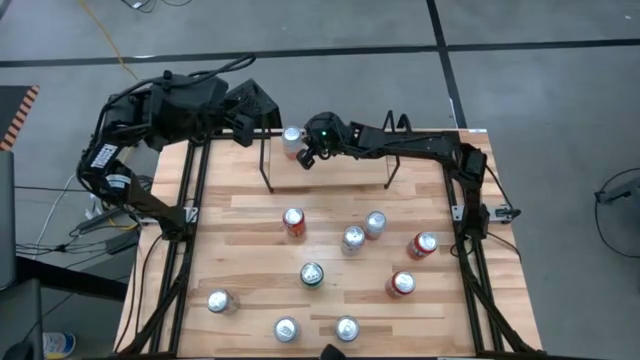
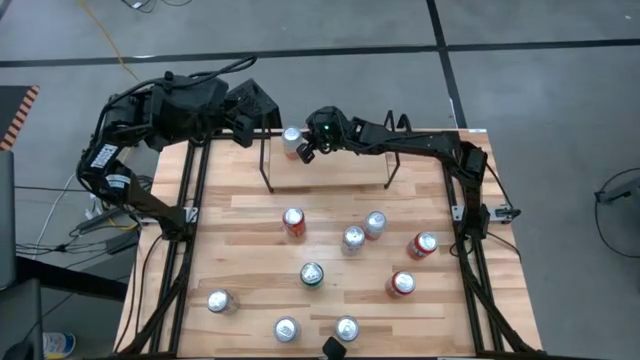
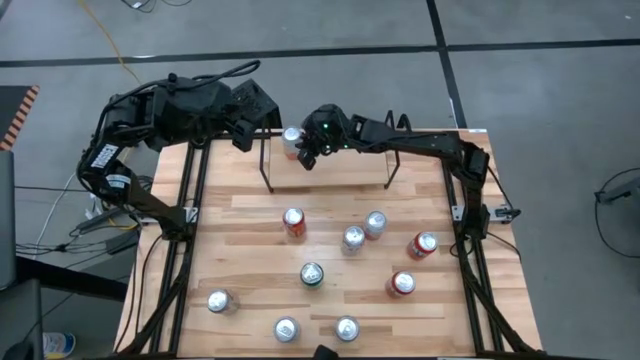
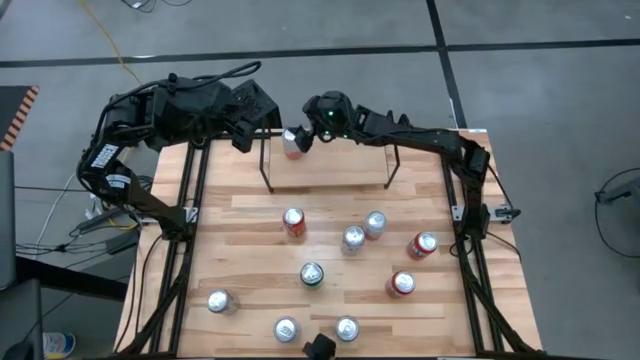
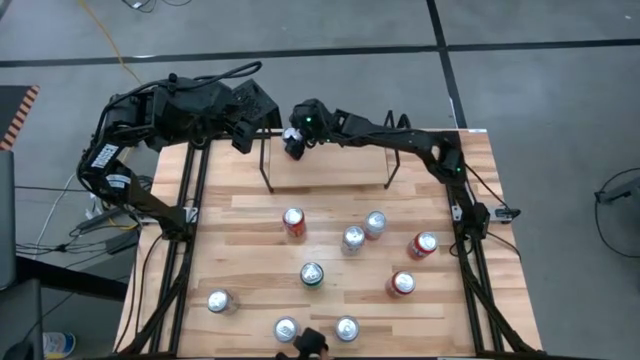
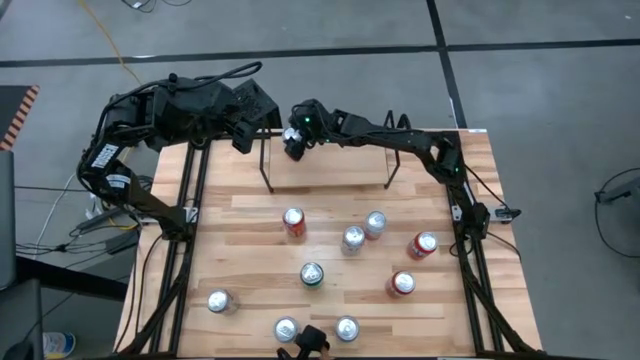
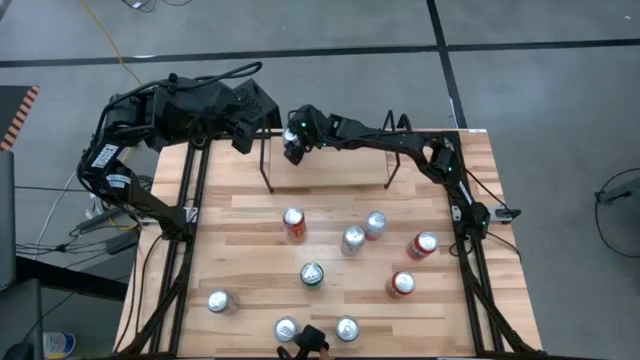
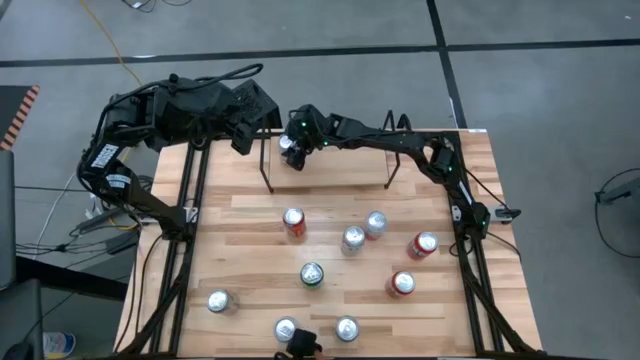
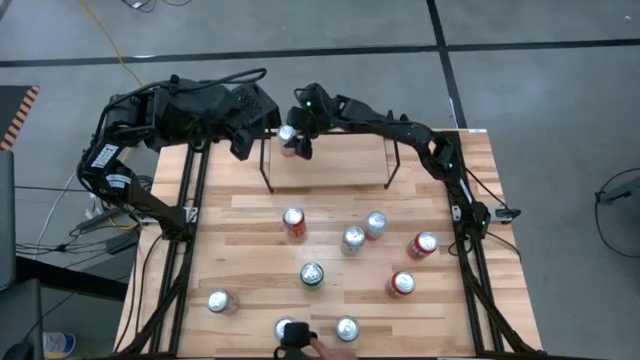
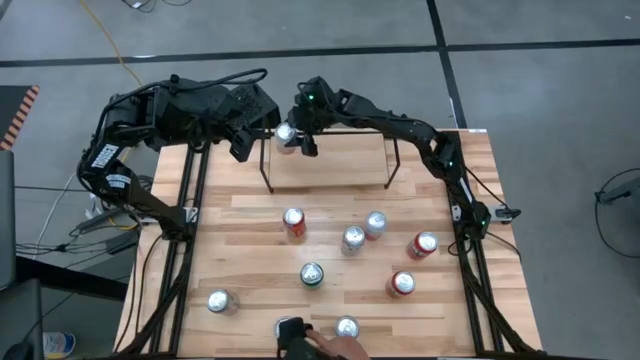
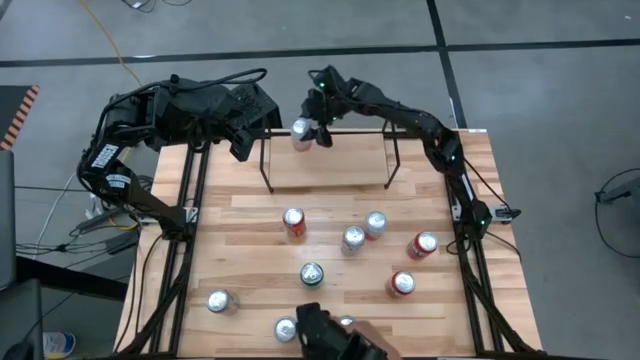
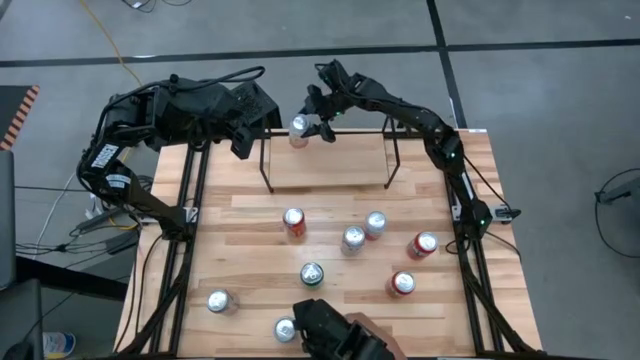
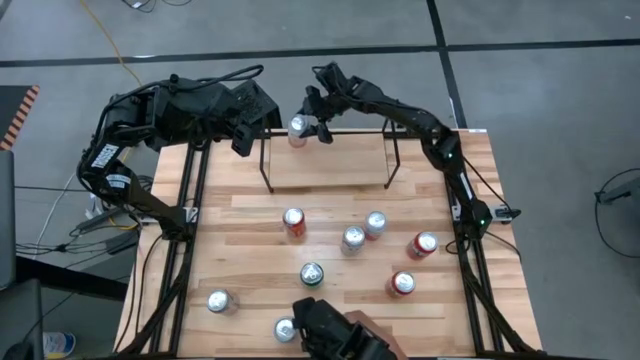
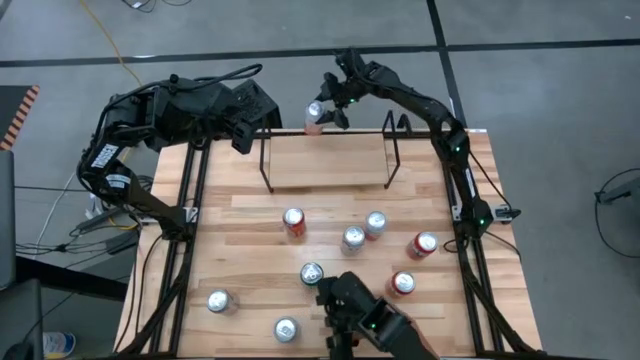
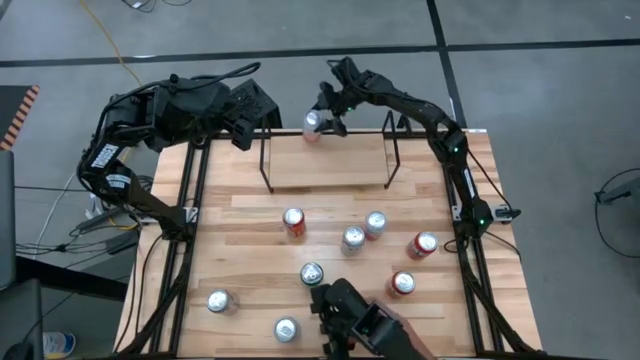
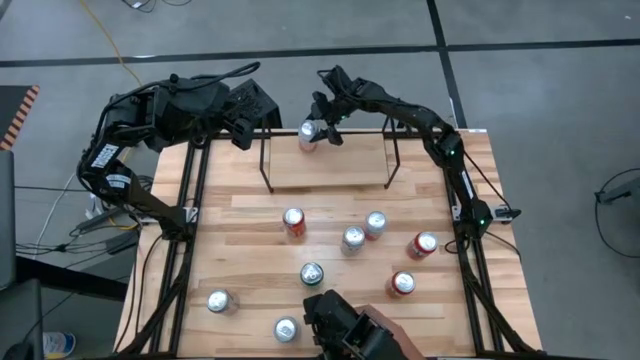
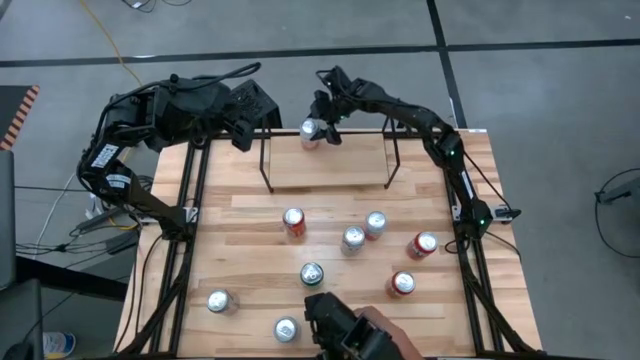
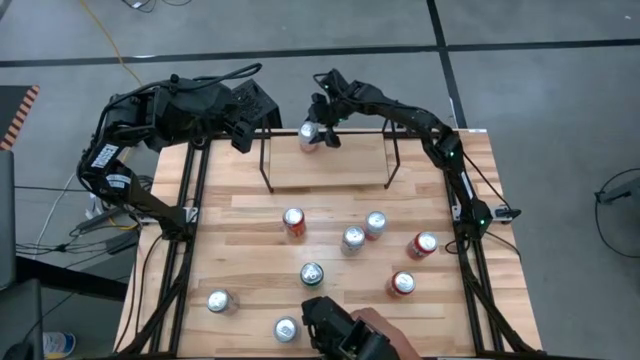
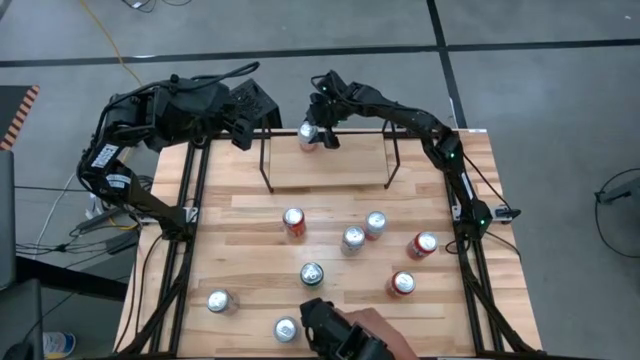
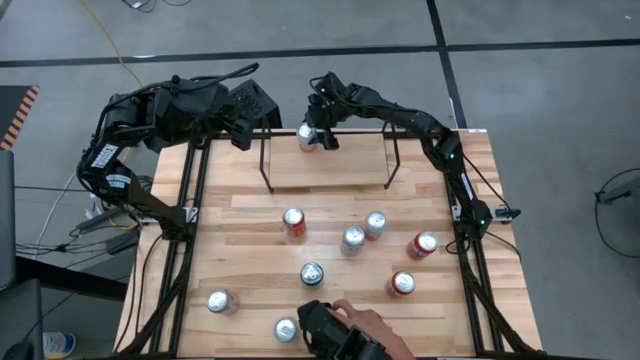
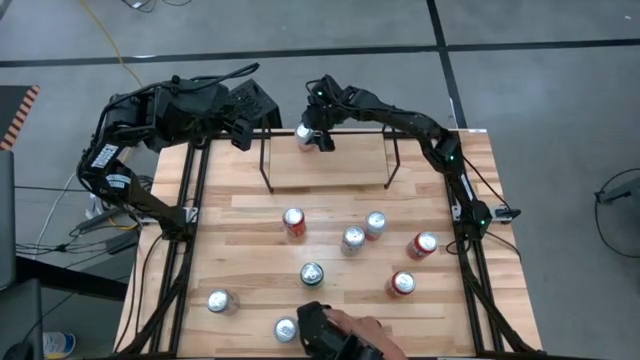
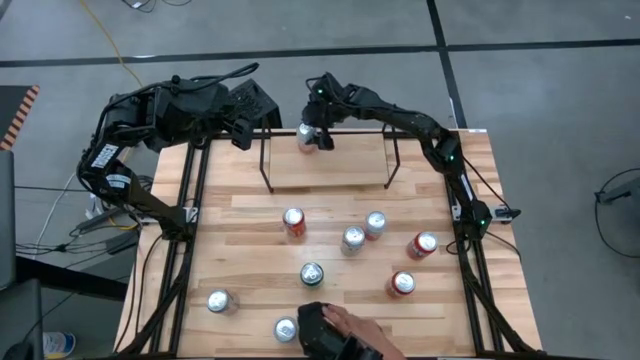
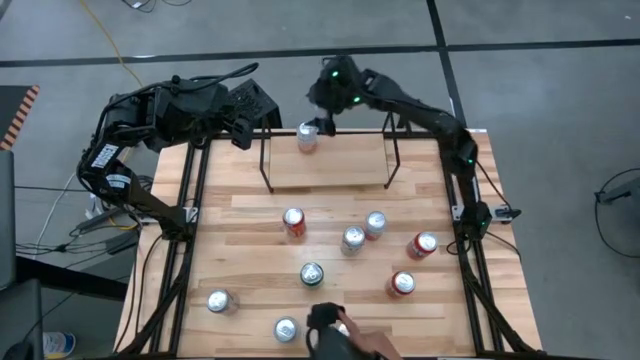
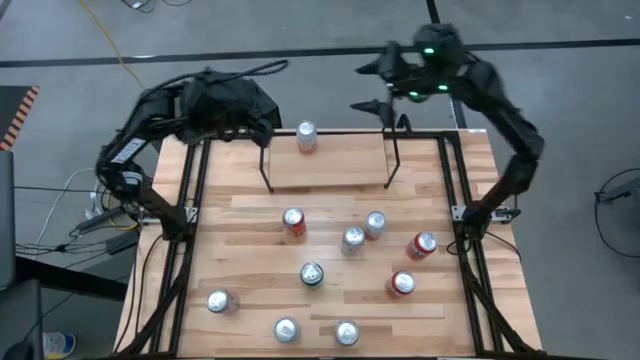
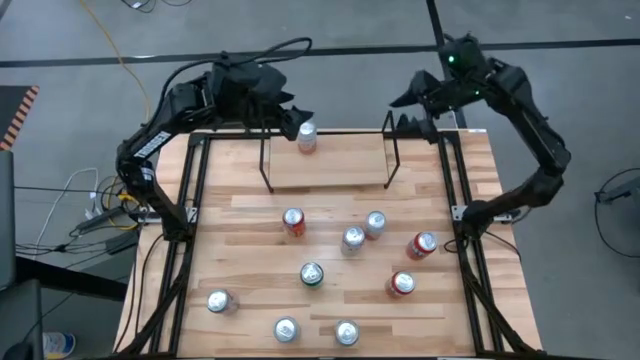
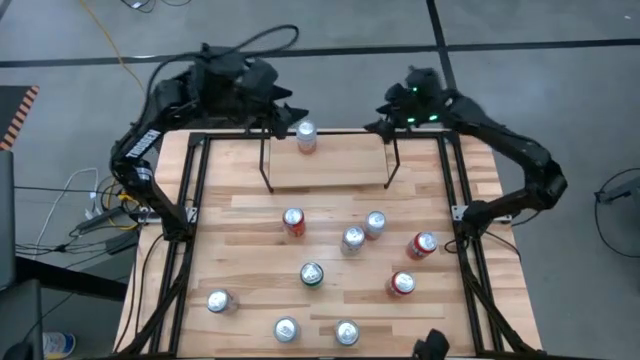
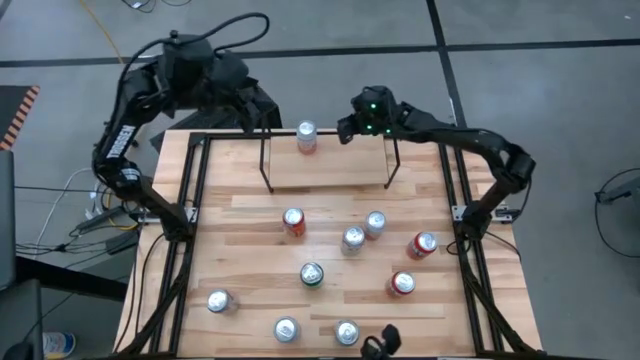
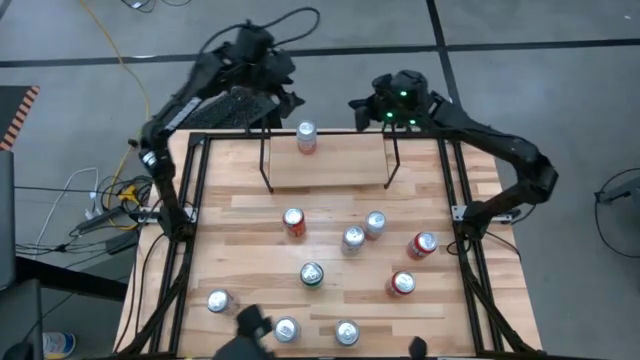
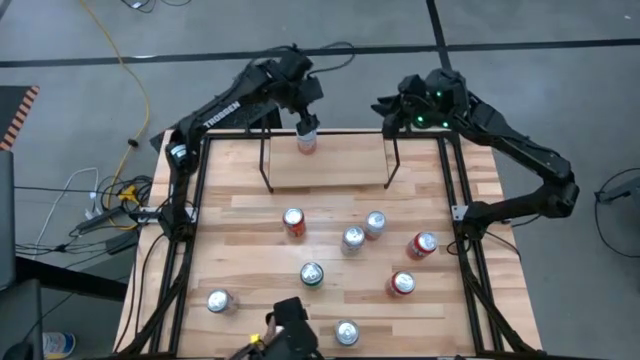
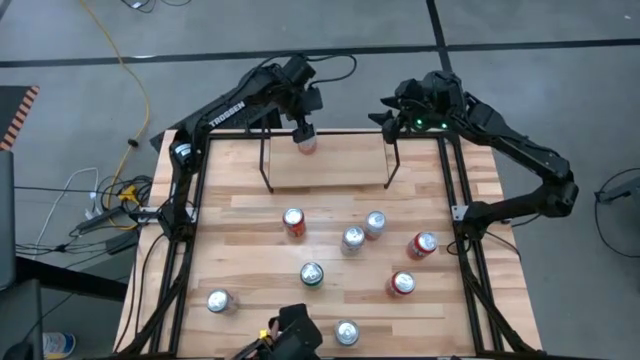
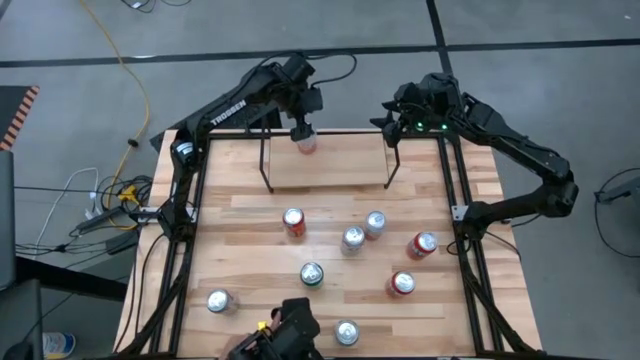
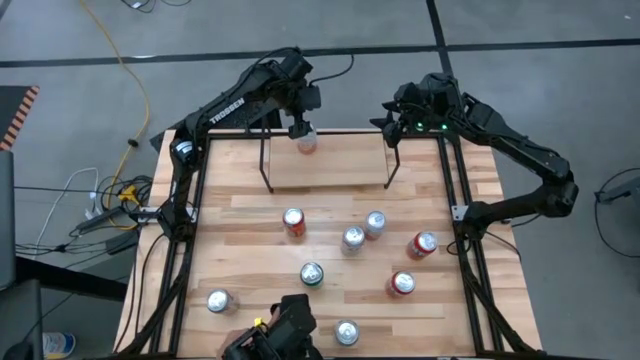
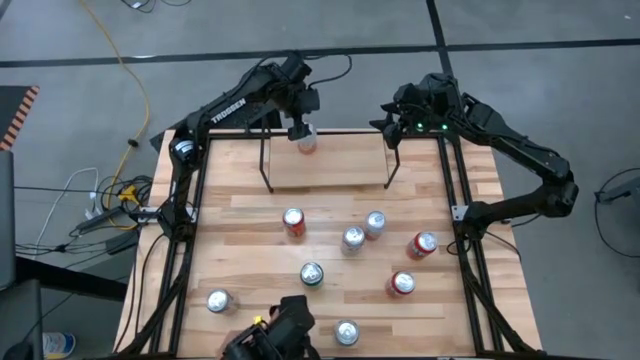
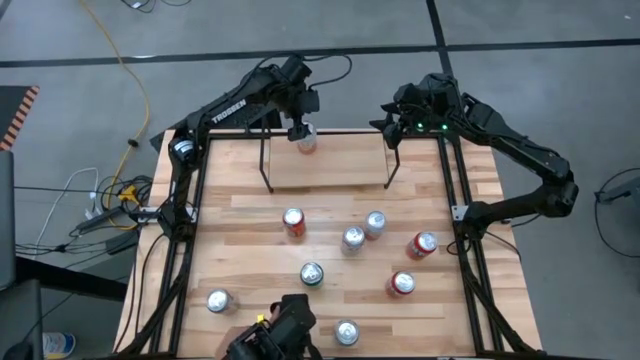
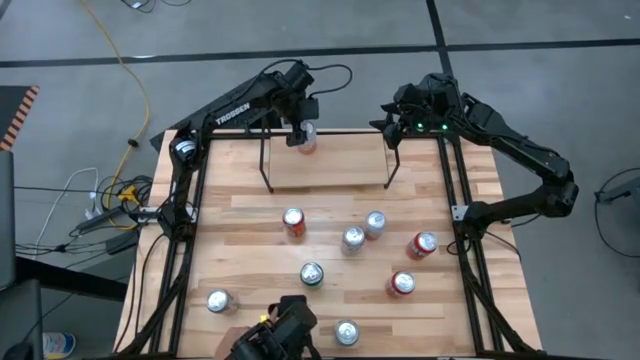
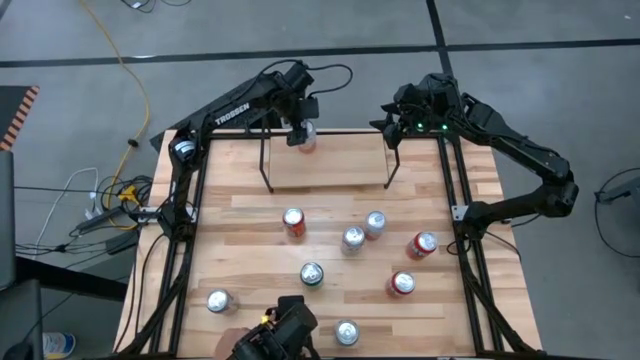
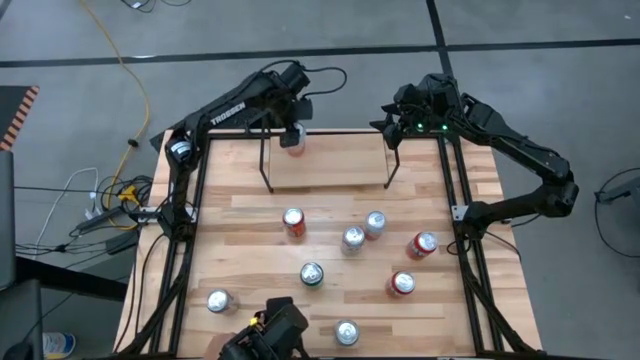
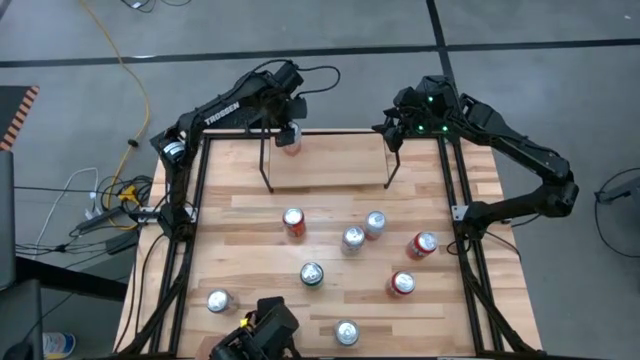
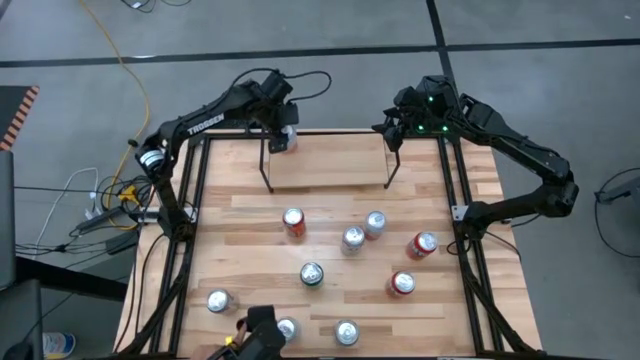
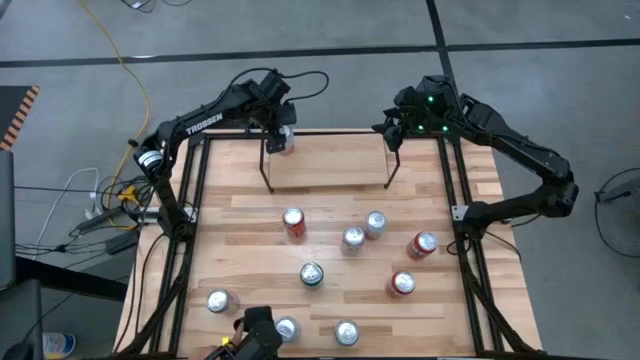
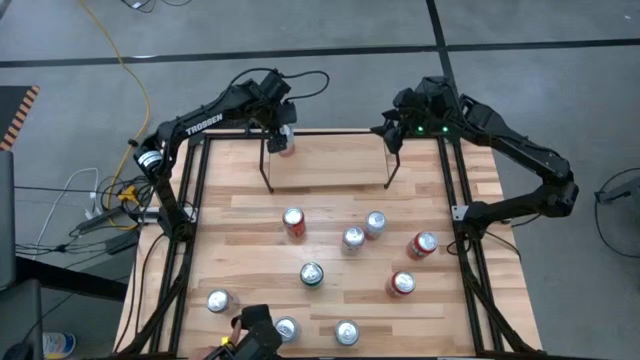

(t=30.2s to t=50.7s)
Task: Place canned beverage on shelf
Put the top left white orange soda can on the shelf
